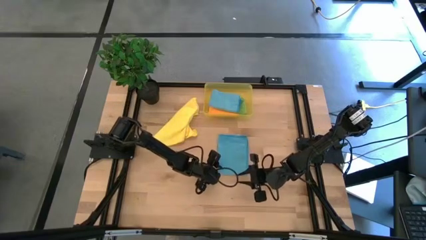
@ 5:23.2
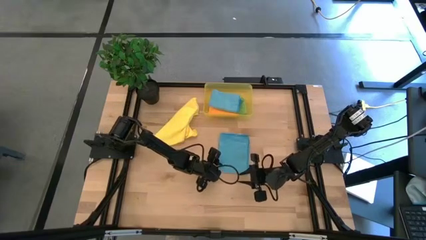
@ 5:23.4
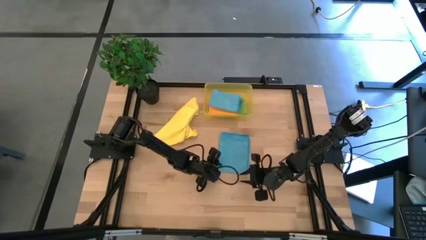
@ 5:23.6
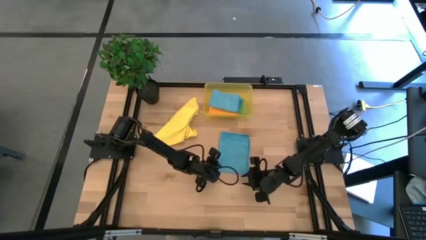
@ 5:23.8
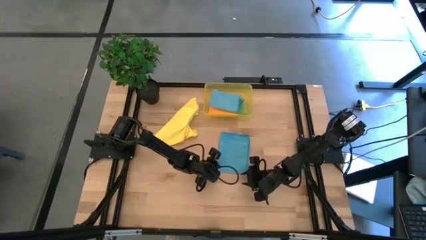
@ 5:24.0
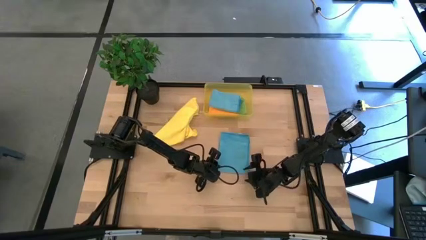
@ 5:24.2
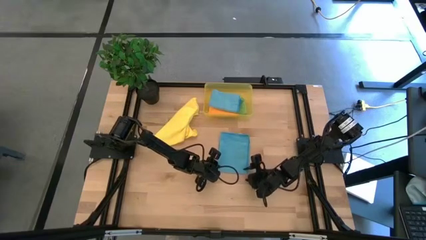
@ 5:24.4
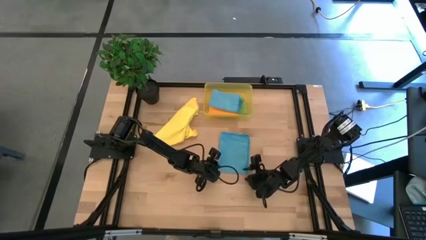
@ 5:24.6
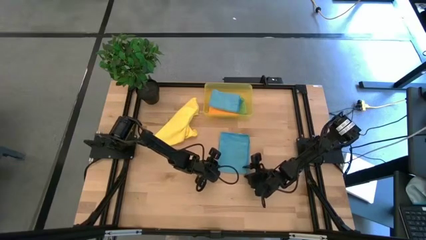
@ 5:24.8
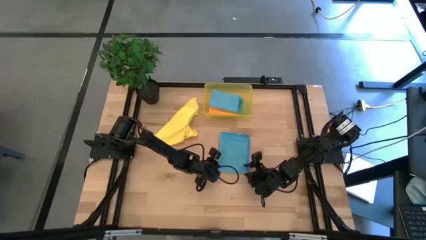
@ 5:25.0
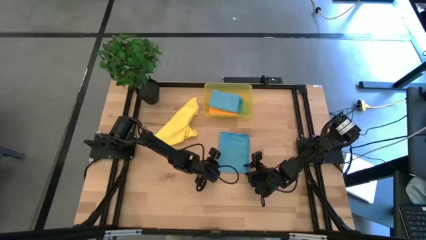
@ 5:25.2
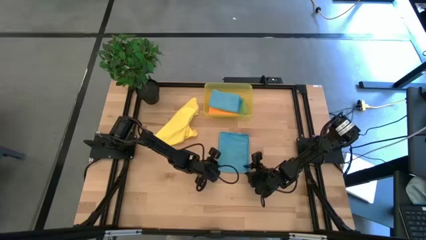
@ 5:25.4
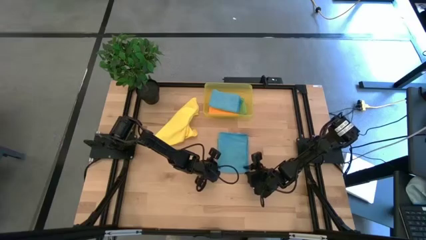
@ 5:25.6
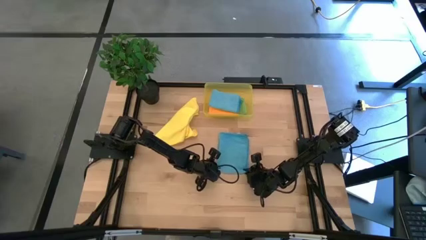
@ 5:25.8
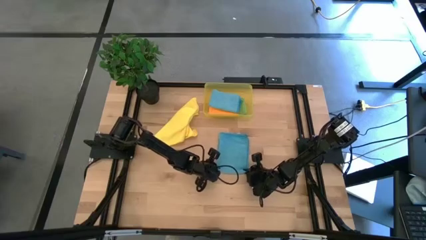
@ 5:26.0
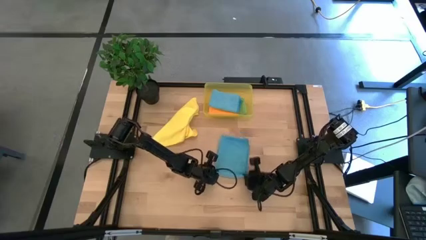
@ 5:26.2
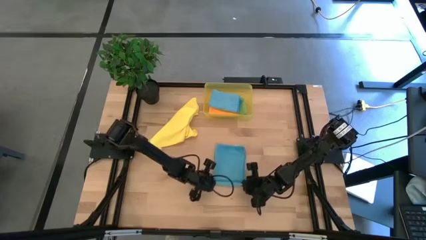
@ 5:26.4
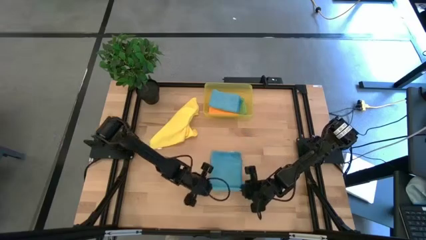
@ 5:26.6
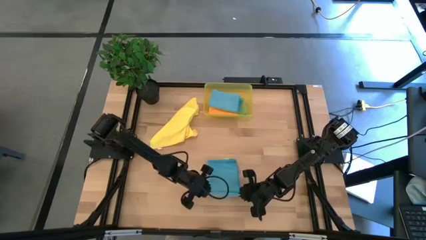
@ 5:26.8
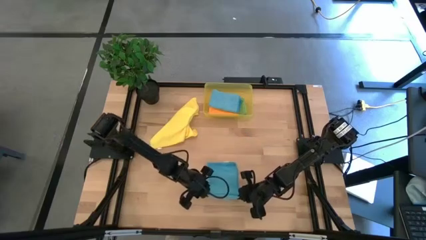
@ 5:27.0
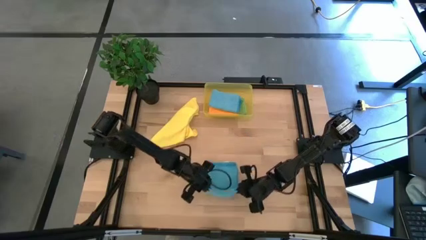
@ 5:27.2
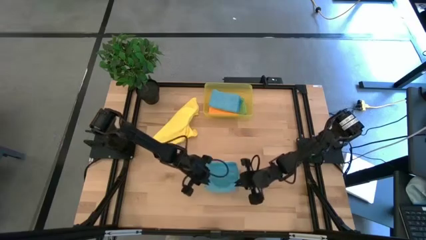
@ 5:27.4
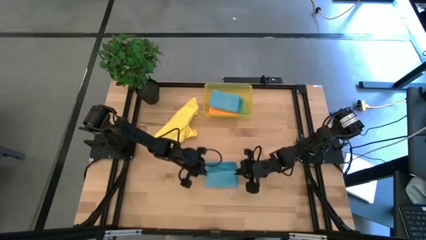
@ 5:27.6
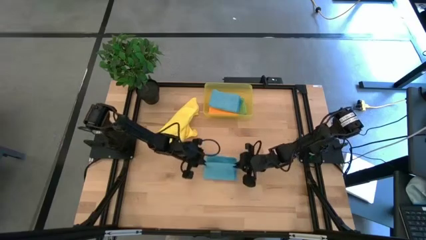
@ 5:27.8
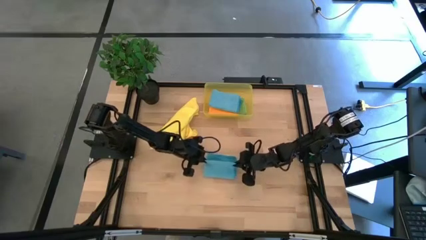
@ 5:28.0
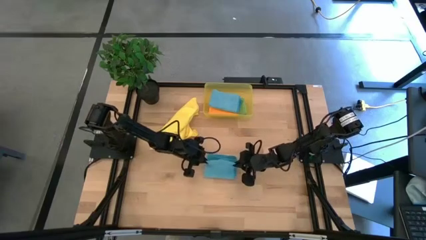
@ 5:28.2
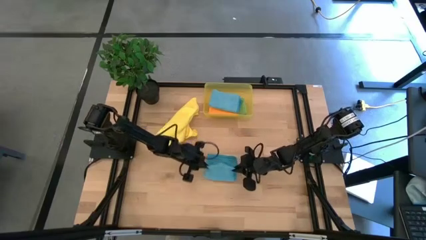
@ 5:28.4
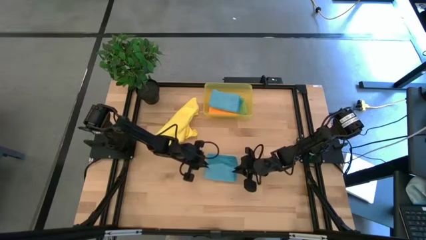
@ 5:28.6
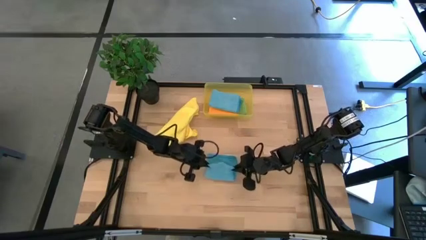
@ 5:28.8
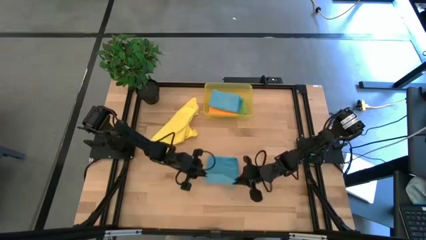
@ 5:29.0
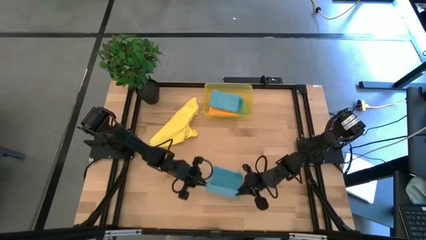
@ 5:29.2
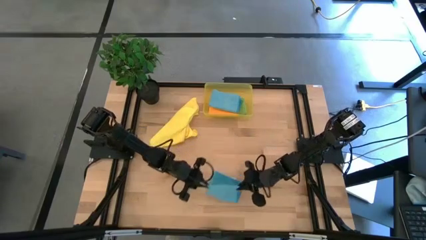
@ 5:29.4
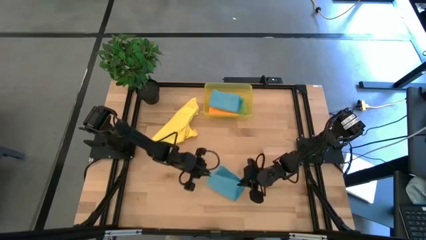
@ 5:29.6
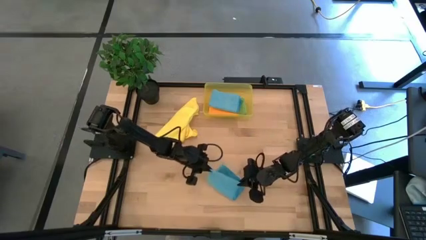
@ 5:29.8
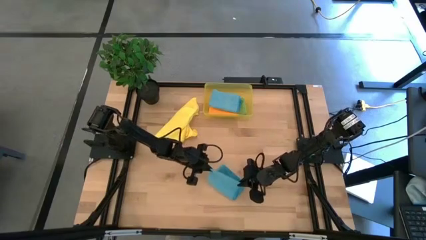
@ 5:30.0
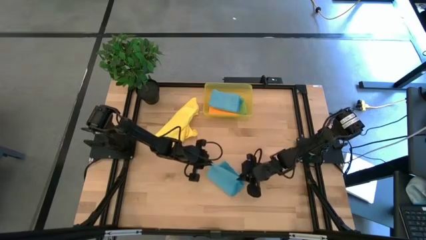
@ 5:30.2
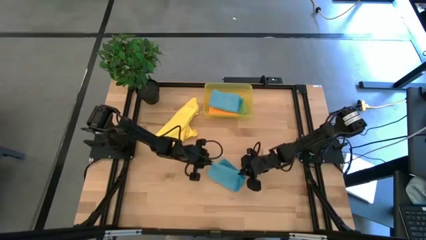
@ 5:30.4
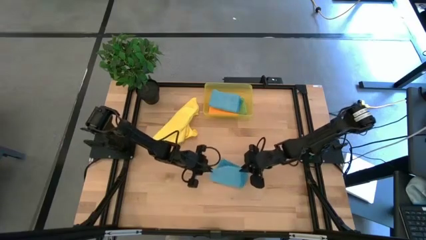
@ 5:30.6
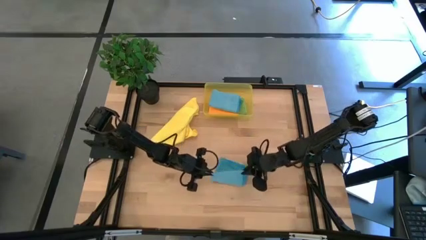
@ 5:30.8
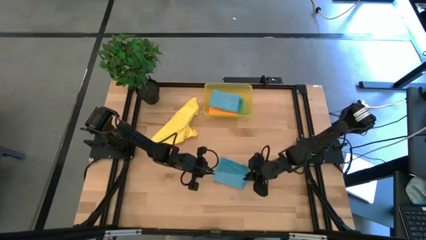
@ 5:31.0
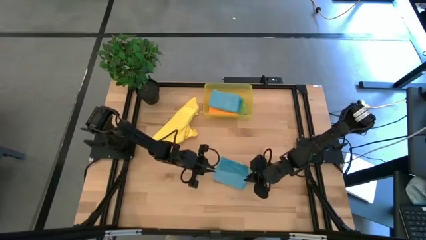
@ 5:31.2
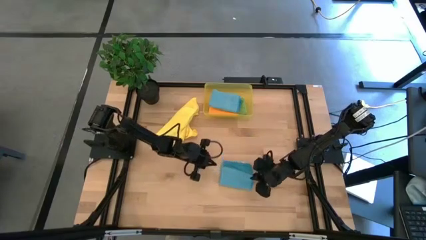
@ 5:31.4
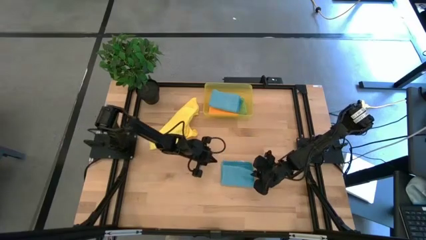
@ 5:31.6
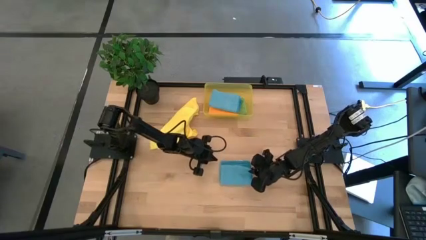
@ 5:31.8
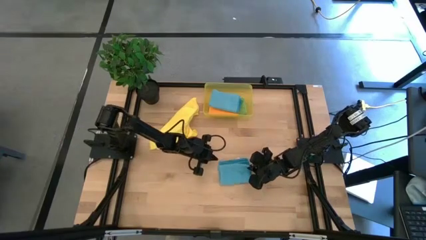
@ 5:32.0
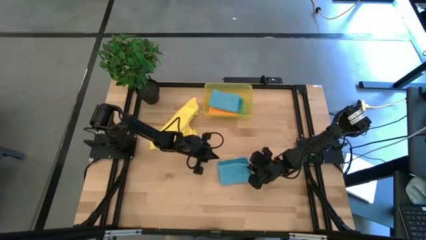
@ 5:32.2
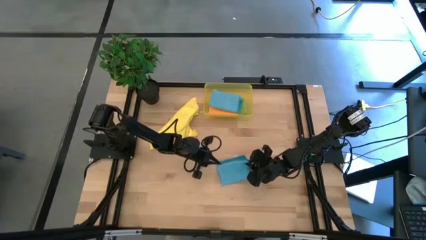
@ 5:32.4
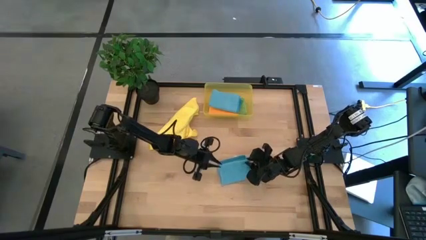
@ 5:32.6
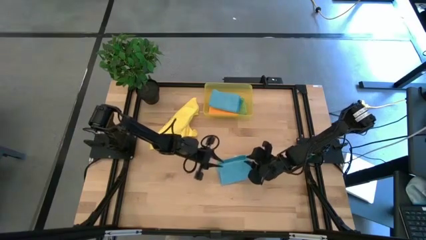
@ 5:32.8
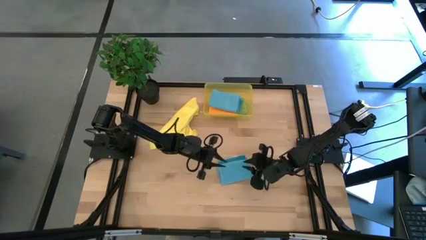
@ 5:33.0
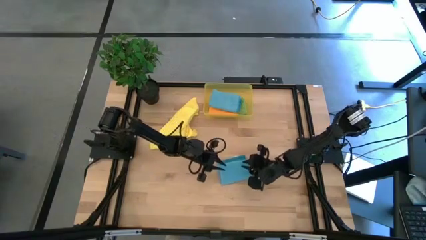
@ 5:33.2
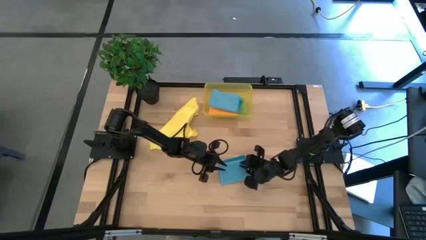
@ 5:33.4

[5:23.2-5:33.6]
Task: Fold microfiber towels
Fold the blue microfiber cloth

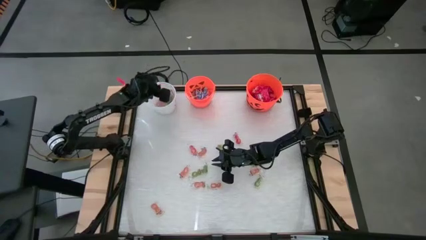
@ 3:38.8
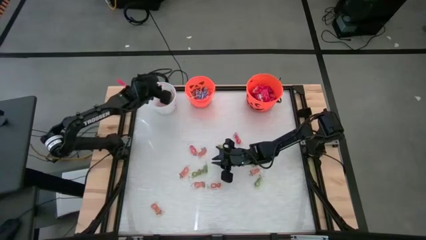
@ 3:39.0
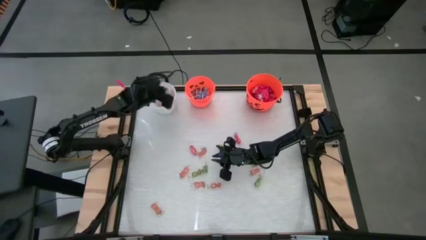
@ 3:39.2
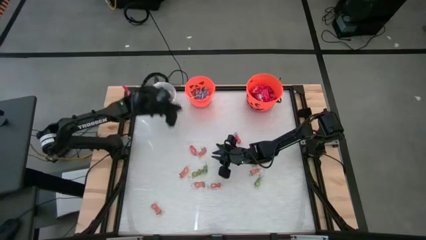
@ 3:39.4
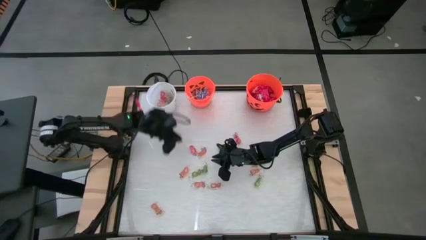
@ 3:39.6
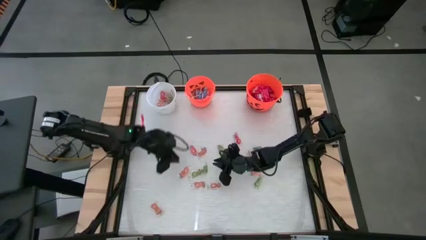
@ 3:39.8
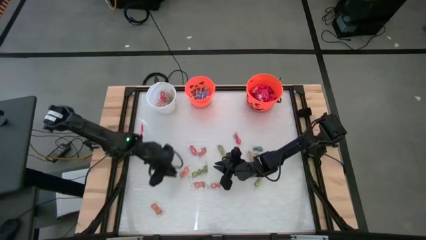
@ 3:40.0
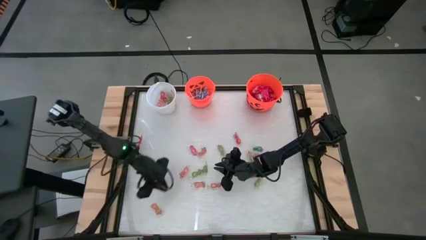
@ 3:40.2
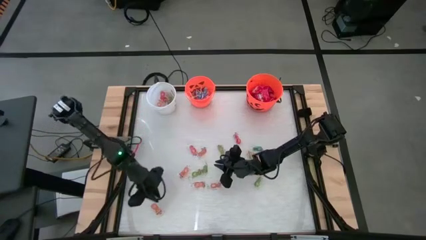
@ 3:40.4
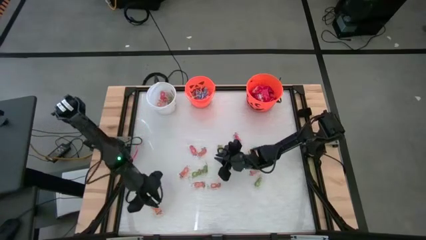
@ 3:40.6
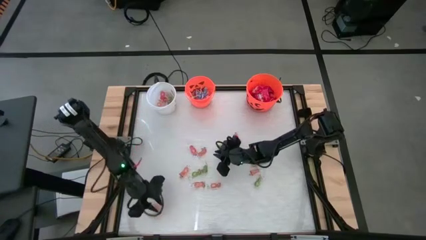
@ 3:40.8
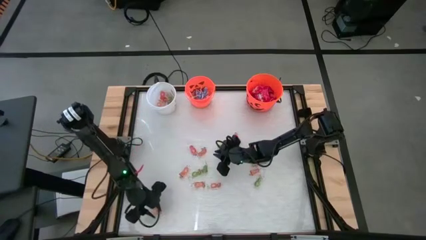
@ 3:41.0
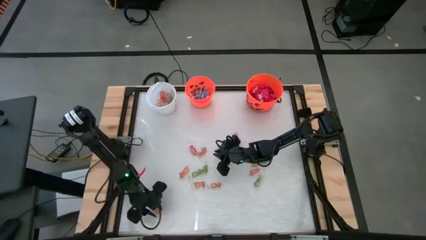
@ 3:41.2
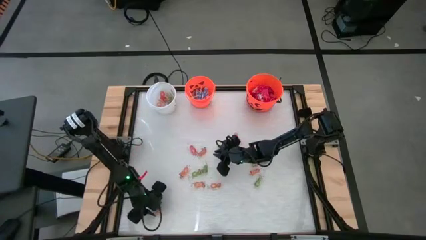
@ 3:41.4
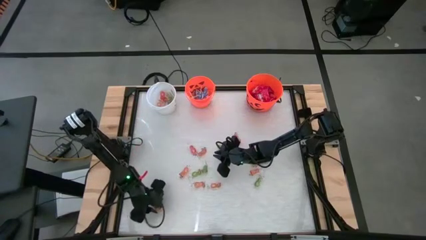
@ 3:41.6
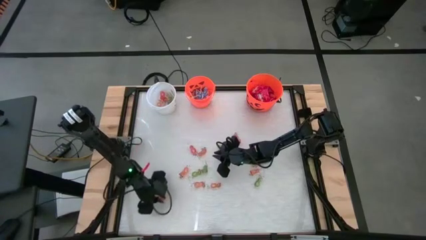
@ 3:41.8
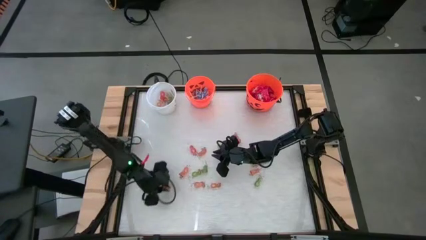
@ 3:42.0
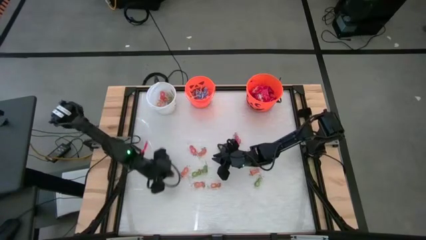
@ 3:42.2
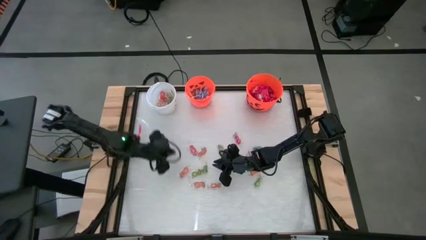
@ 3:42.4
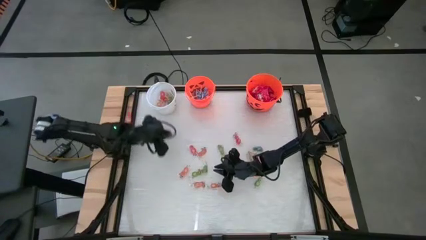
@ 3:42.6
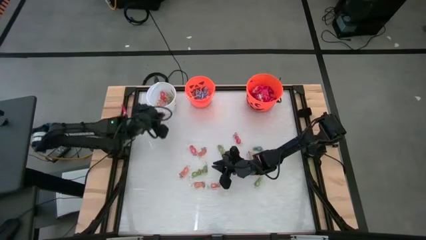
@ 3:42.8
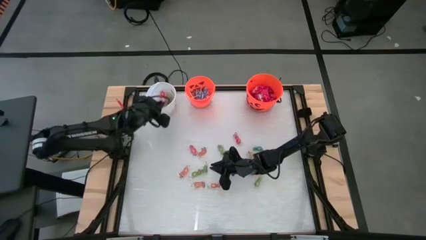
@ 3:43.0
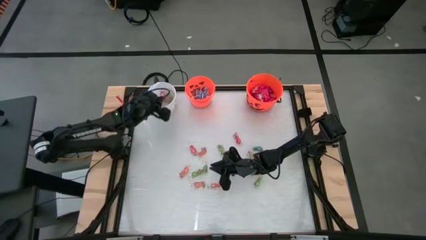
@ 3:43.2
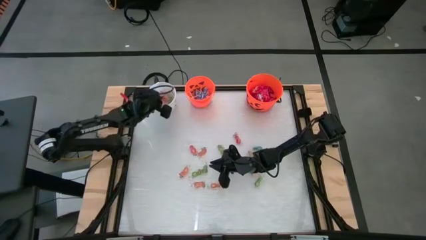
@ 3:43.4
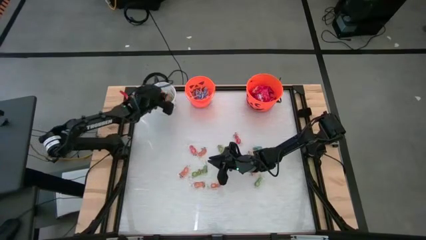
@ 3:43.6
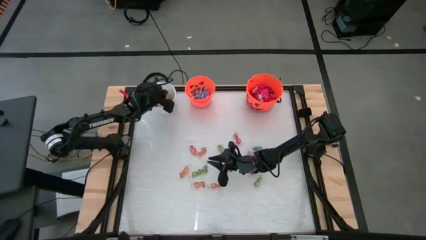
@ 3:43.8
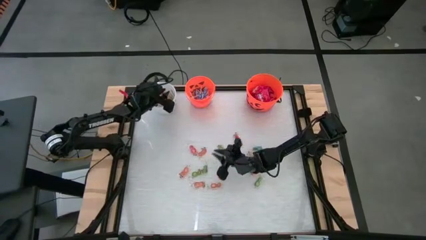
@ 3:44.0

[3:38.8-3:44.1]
Task: Sort candy by brand, put in halloween buckets
Put the orange gummy into the white bucket

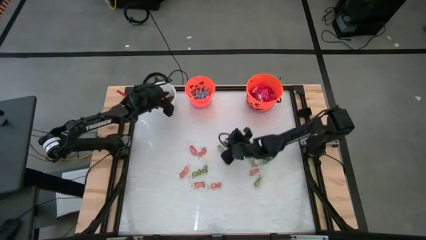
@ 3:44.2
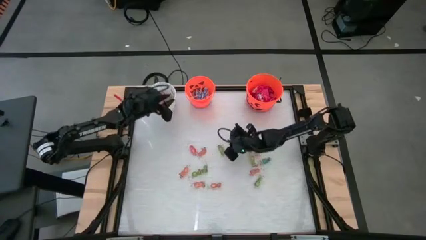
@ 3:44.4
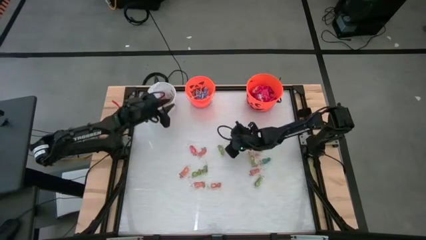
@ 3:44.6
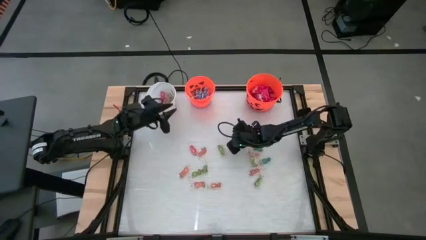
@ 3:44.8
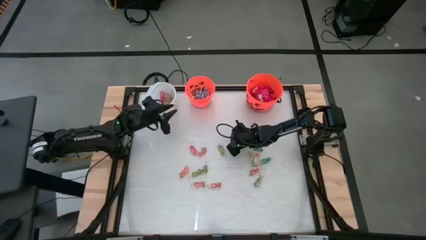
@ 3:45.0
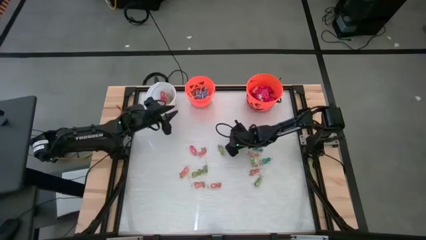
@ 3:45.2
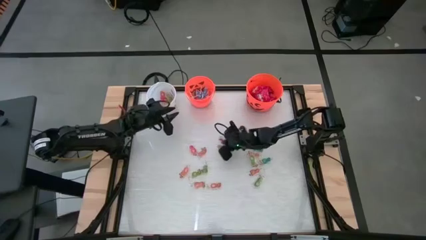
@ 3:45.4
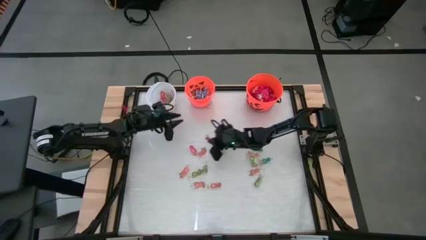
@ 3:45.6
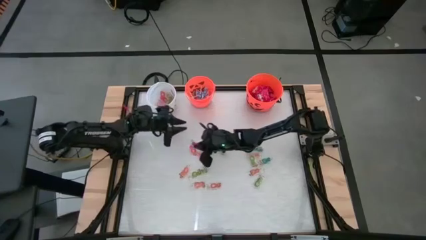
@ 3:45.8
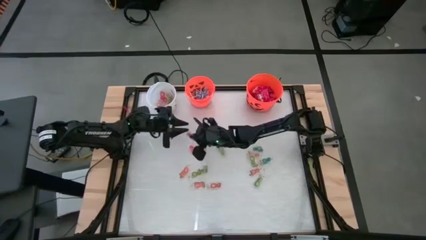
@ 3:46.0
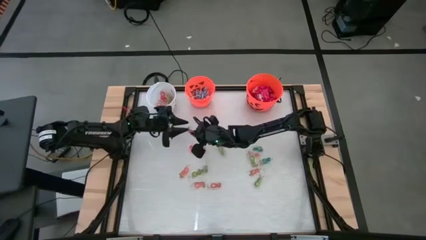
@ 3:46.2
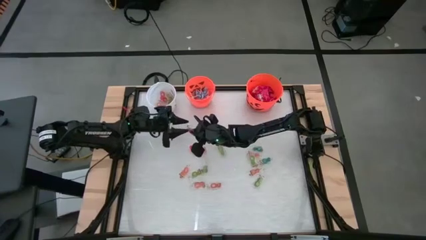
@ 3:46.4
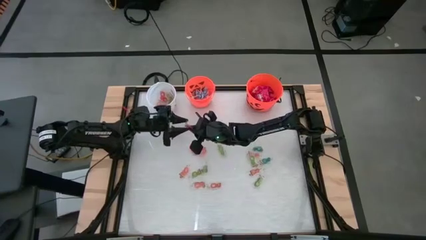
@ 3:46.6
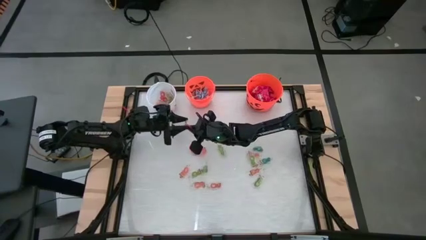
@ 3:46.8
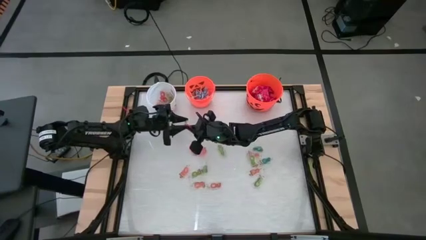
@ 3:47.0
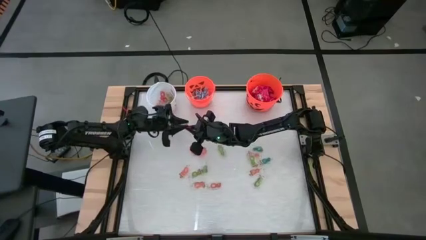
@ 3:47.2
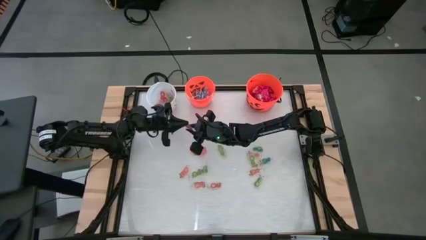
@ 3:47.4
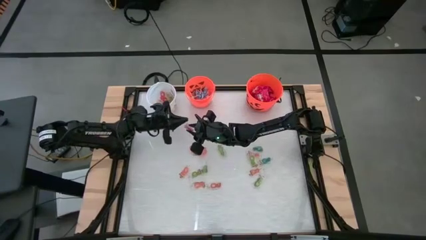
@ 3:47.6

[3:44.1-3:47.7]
Put the orange gummy into the white bucket
